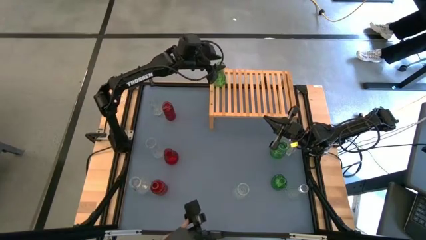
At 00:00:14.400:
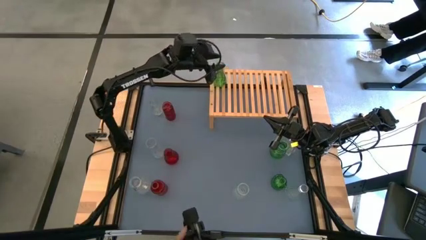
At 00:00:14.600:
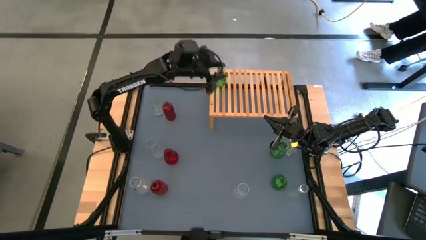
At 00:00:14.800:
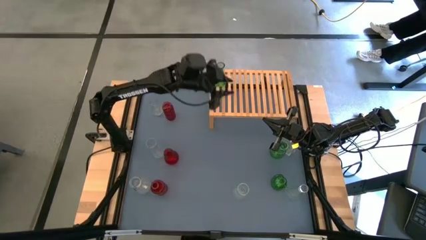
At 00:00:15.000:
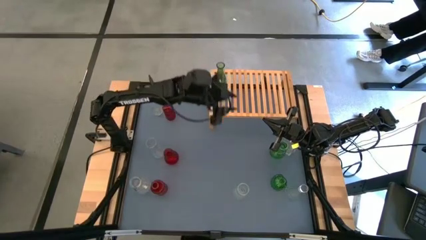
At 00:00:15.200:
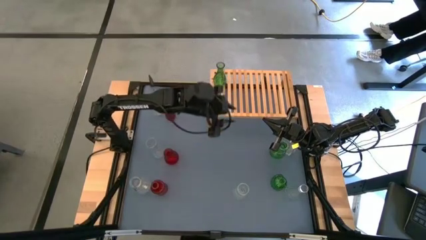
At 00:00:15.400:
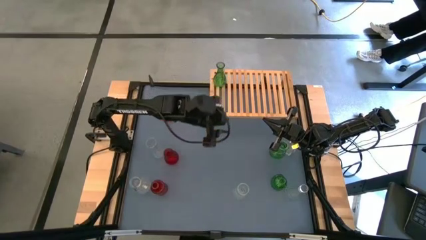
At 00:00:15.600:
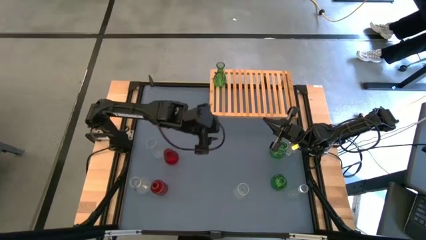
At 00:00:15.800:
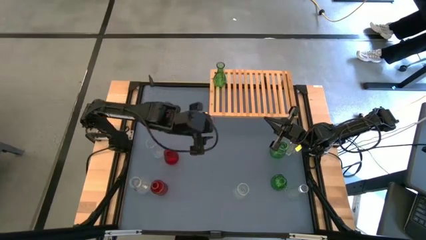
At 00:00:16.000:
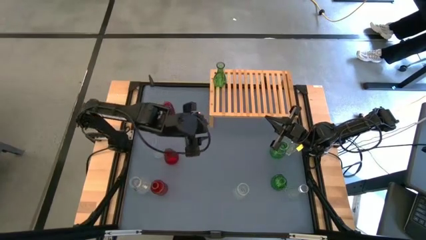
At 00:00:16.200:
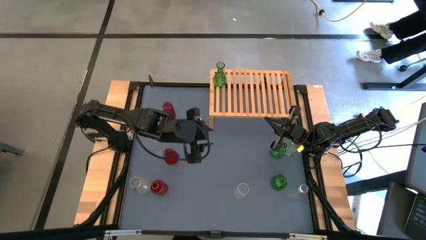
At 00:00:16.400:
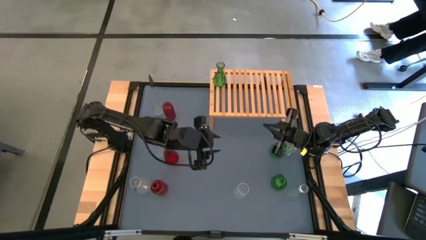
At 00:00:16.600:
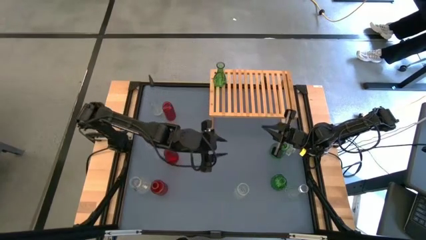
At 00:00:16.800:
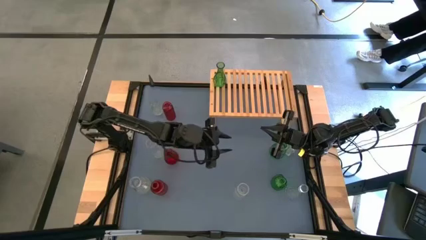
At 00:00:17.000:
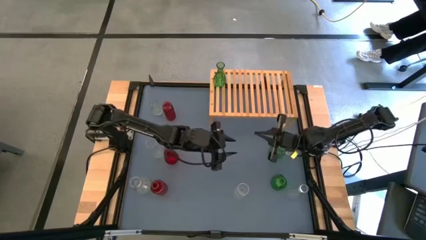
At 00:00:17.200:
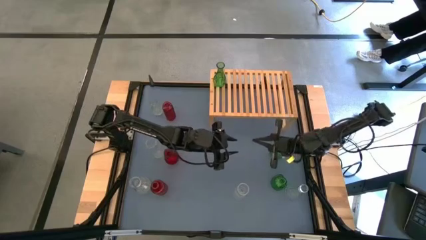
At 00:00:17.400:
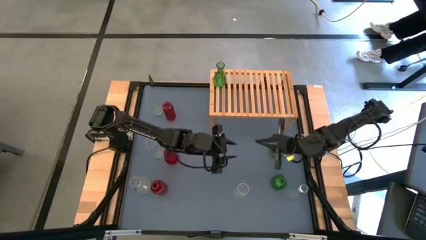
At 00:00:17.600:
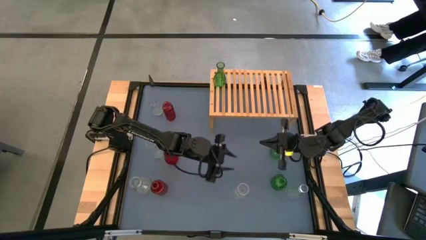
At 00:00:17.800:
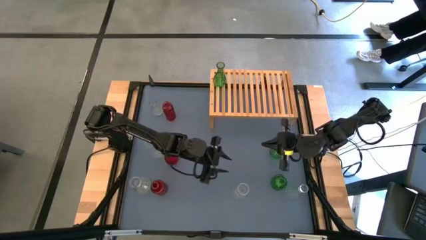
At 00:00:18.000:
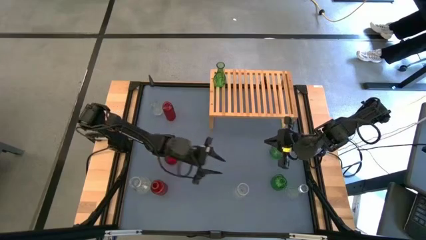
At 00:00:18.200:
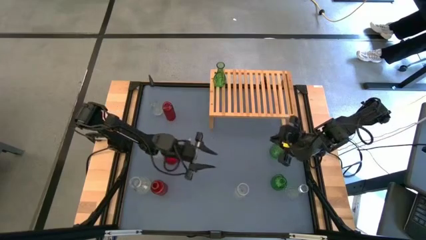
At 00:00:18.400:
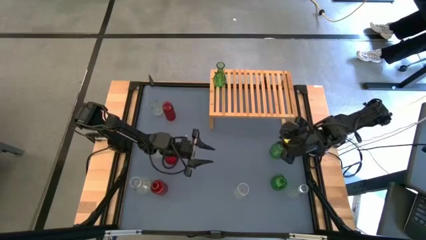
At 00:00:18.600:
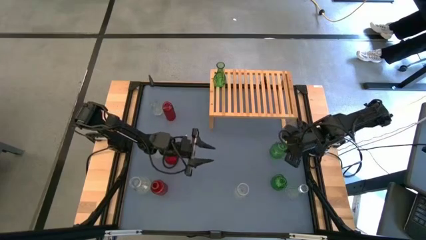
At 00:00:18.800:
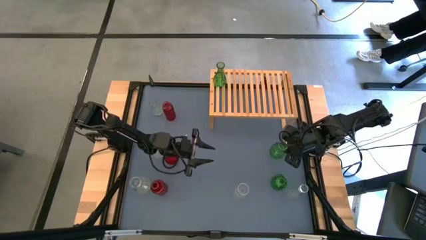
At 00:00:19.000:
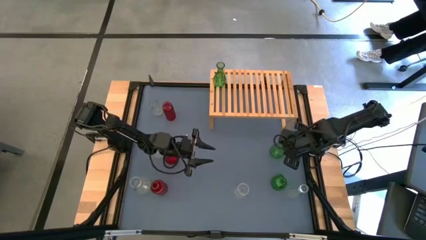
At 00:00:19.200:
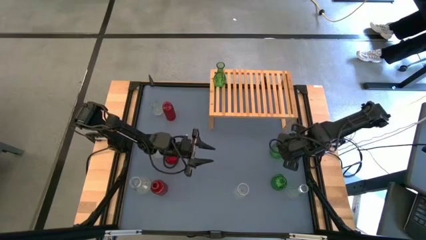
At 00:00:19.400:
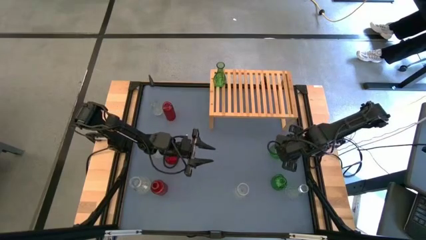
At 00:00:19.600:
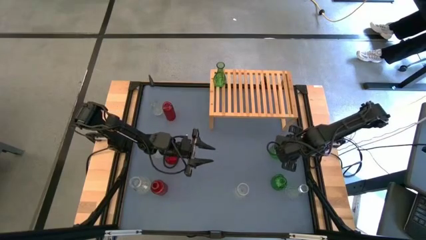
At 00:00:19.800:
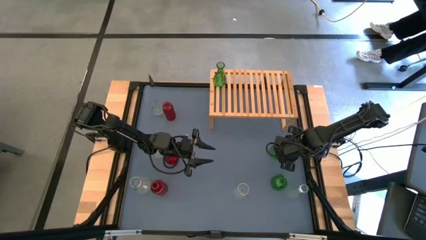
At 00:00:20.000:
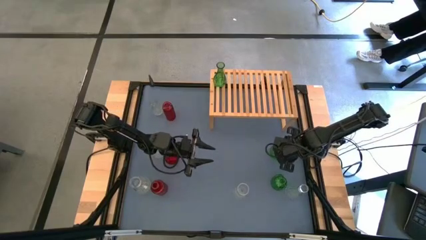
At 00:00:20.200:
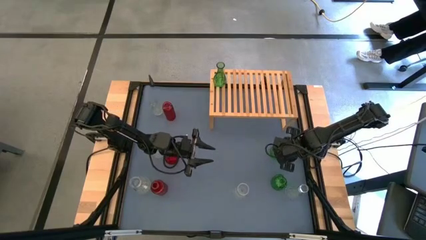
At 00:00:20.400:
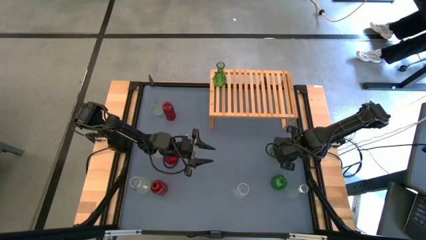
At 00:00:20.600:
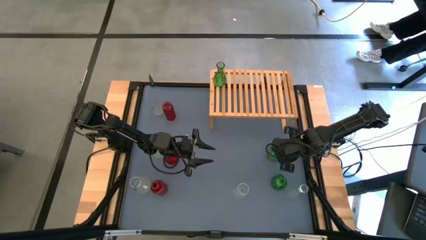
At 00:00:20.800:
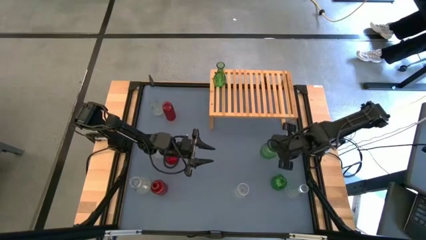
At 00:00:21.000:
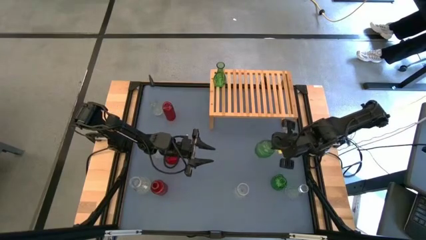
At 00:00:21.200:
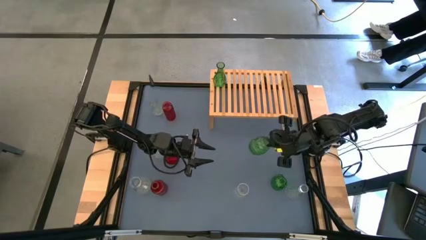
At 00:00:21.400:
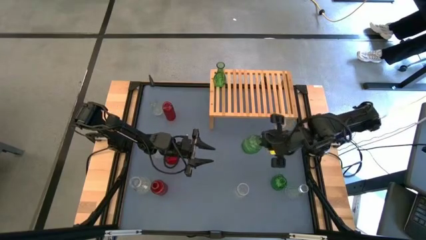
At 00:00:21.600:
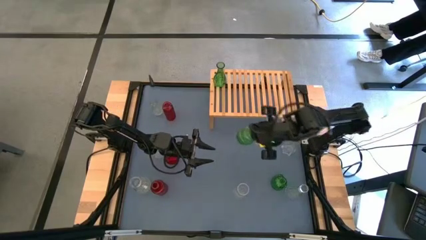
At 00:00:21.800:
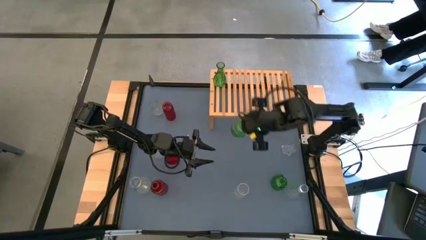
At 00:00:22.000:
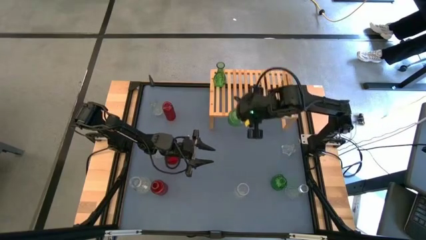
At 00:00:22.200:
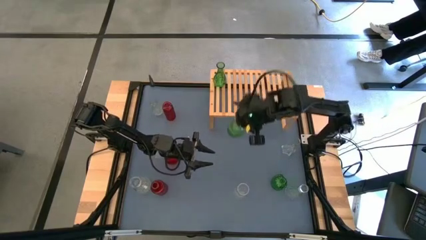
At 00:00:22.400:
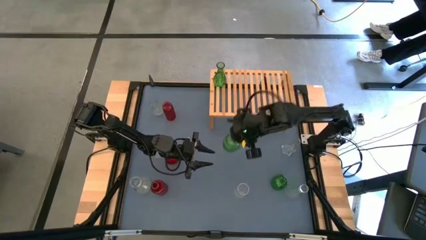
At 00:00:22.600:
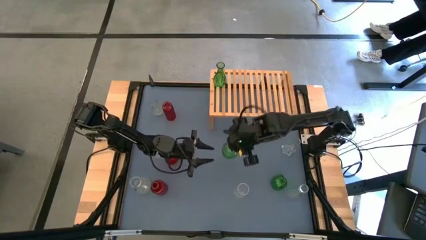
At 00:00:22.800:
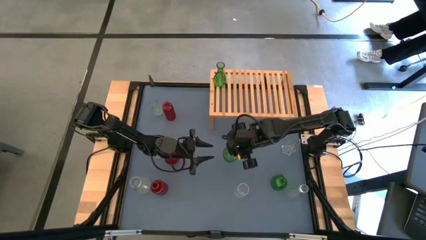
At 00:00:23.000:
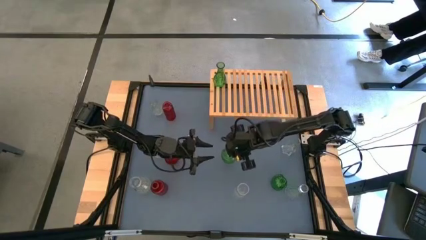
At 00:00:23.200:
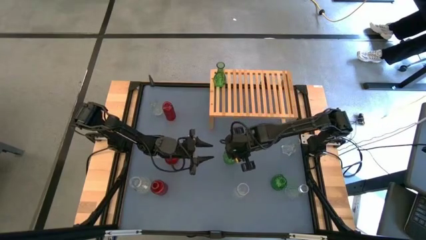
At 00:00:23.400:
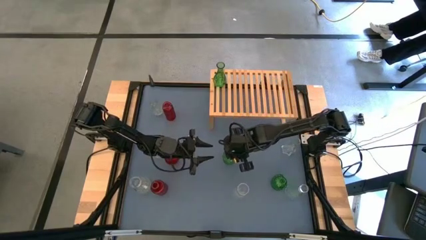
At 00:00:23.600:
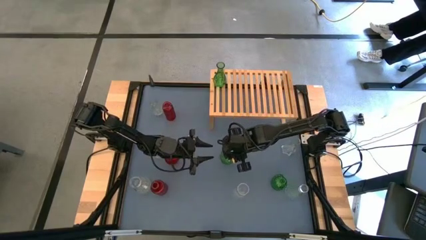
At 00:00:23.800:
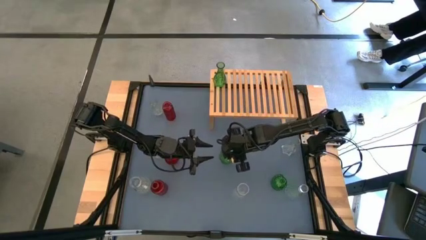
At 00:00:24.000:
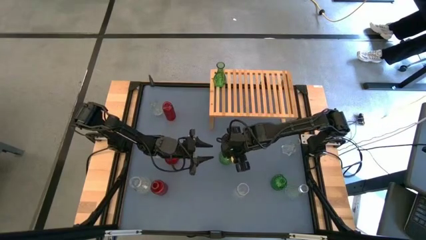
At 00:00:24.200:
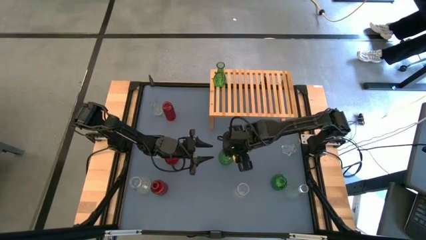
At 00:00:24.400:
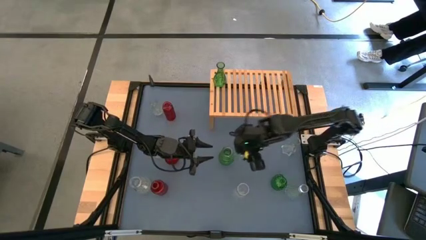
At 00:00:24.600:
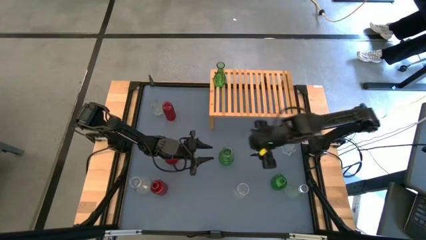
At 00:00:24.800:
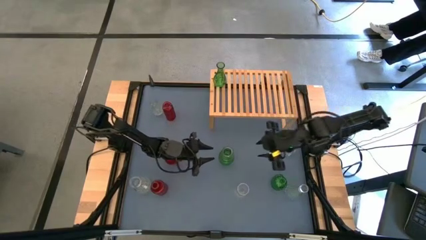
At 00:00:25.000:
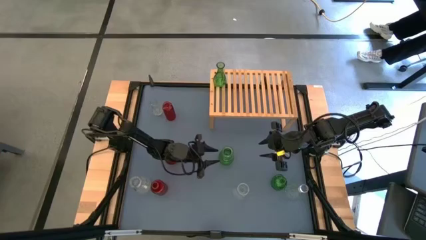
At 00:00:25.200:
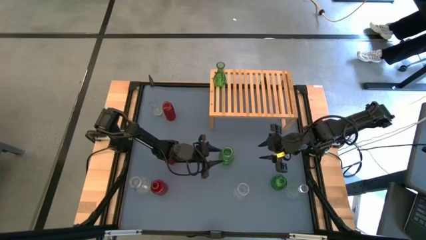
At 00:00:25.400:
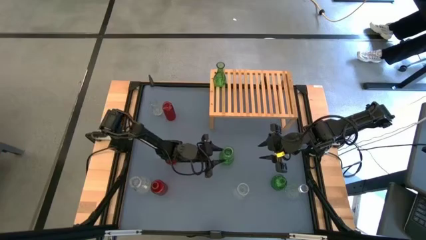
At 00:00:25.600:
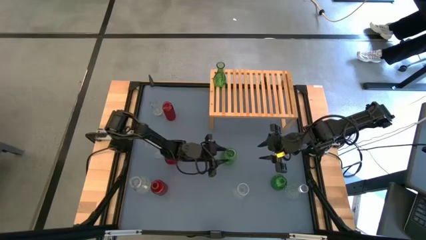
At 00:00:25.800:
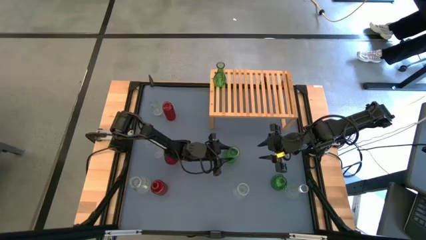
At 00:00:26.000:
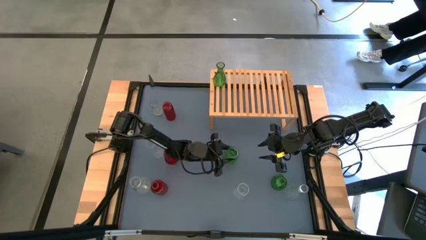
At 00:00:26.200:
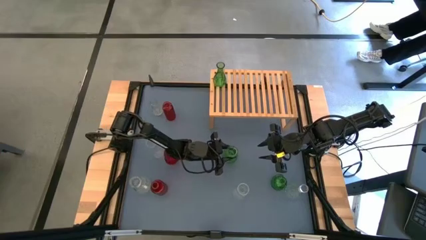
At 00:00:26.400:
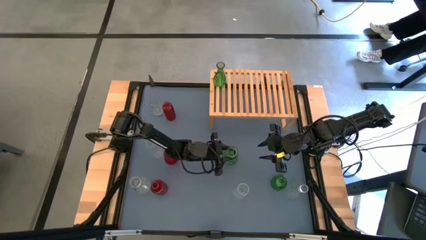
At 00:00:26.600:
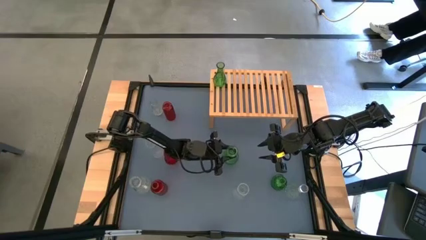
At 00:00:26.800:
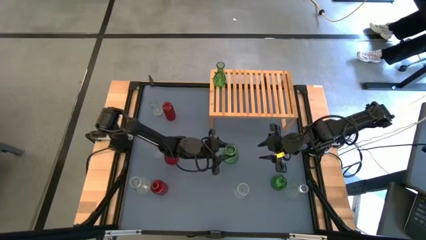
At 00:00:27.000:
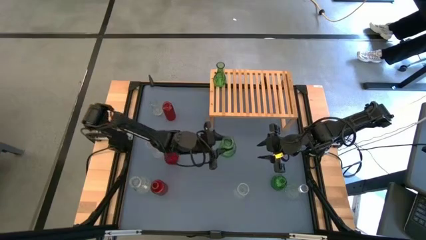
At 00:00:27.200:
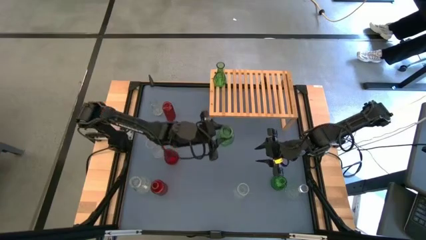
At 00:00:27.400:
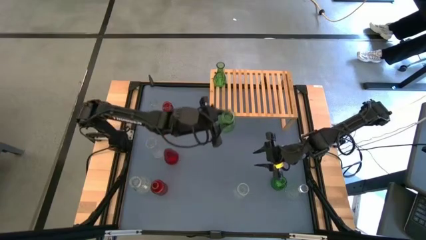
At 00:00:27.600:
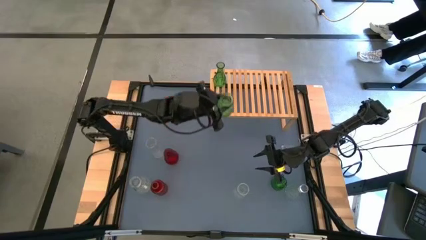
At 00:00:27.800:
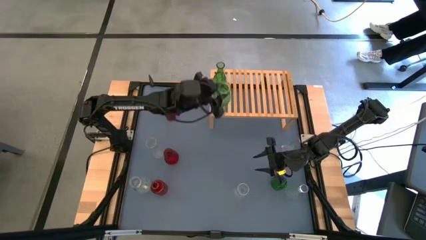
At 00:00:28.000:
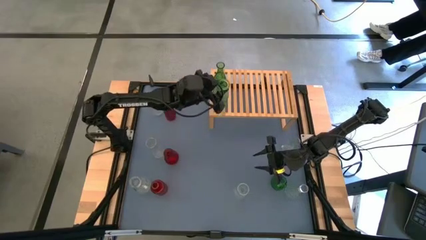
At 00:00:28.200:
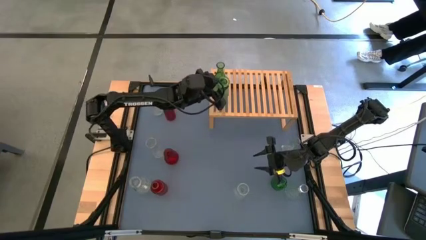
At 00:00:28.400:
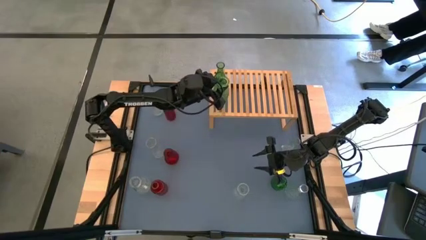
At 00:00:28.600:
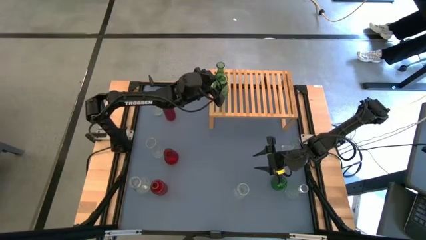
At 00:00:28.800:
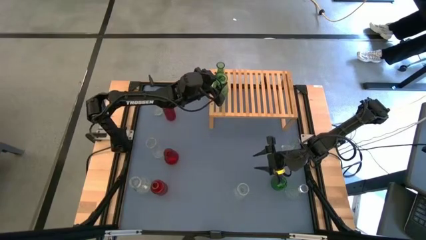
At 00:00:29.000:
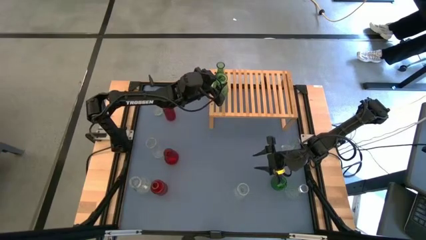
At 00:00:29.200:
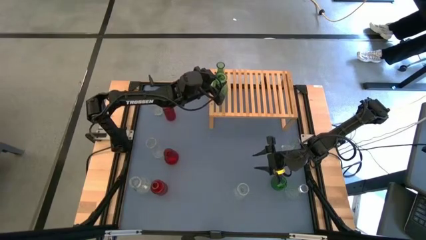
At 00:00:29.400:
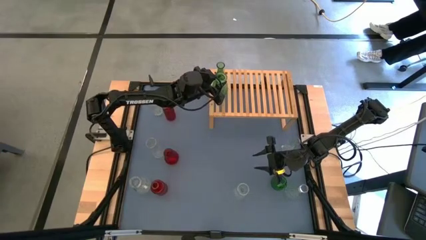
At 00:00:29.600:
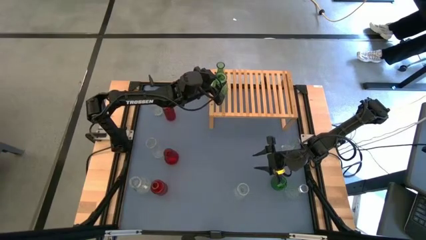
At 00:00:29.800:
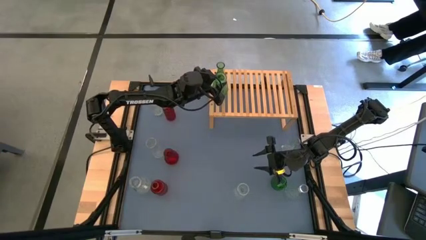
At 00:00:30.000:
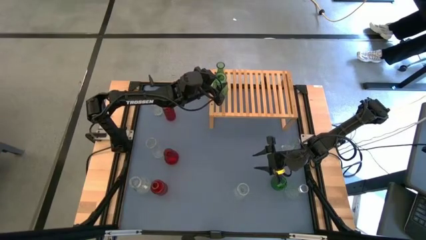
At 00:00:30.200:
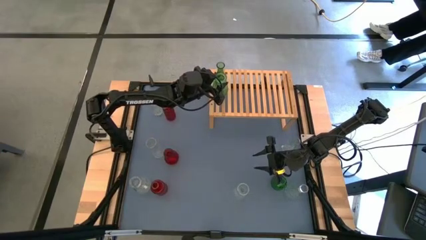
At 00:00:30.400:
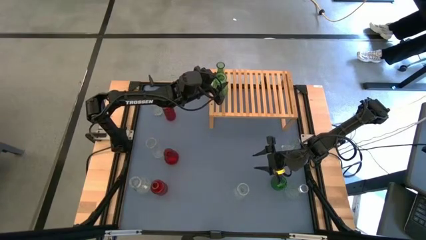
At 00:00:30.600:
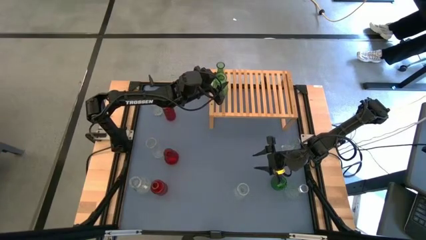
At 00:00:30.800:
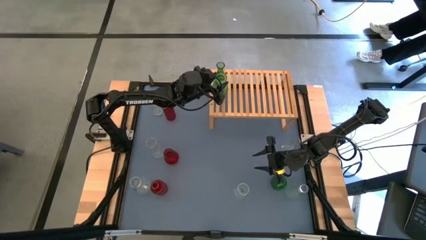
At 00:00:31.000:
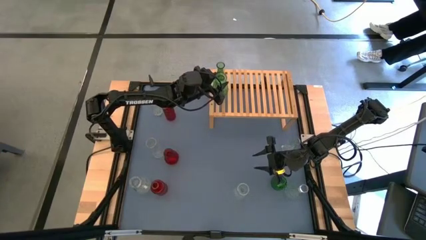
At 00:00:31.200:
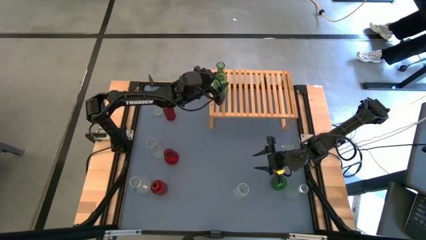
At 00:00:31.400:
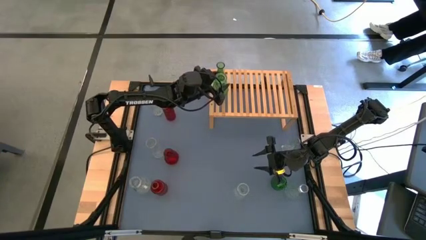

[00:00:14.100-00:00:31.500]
Task: sort vases onto shelf
Put the top green vase on the shelf, aligned with the other green flower vase
